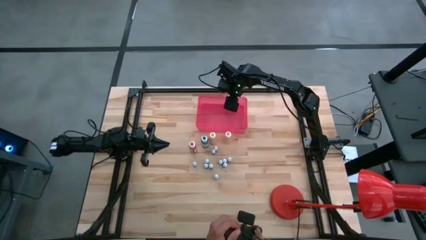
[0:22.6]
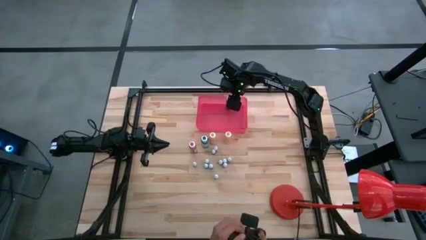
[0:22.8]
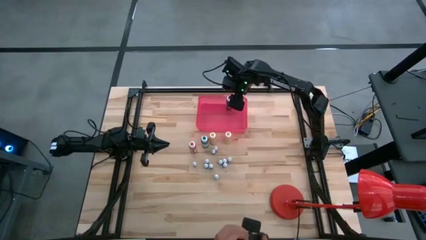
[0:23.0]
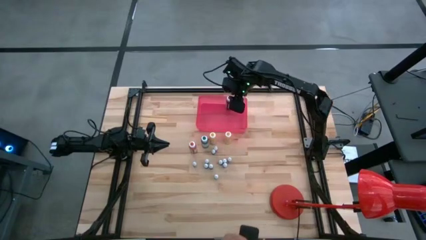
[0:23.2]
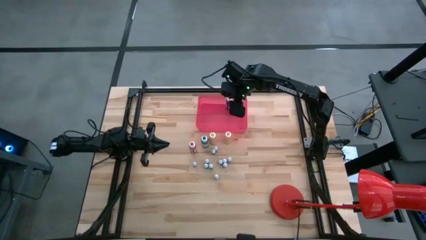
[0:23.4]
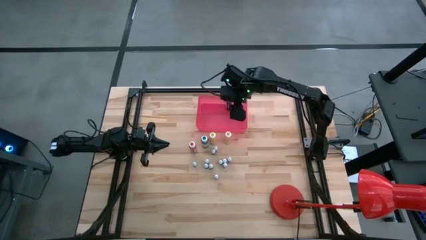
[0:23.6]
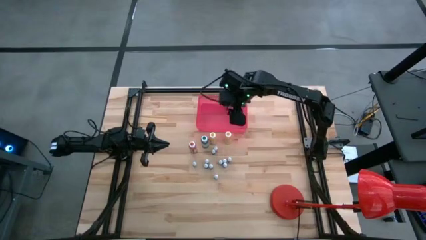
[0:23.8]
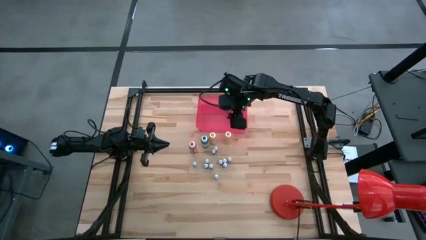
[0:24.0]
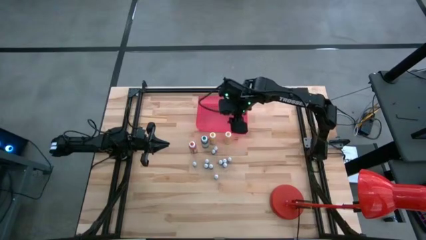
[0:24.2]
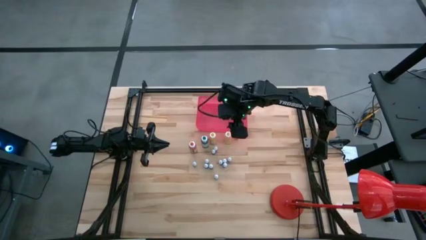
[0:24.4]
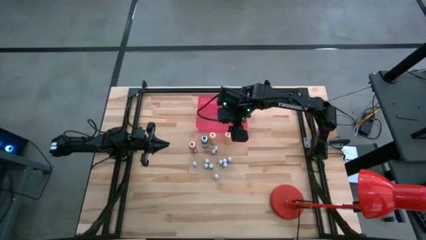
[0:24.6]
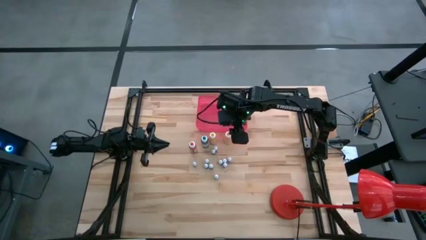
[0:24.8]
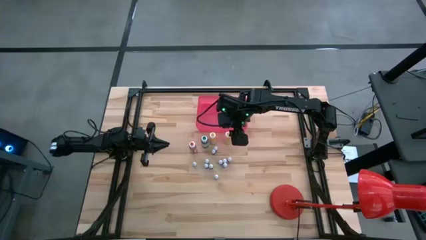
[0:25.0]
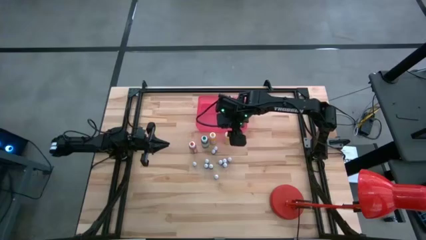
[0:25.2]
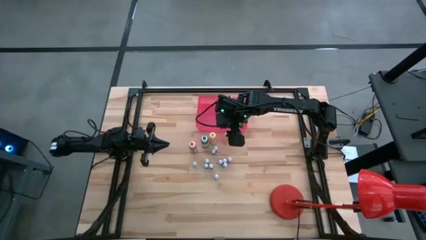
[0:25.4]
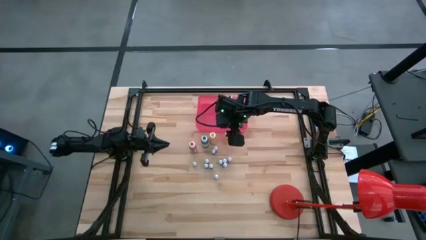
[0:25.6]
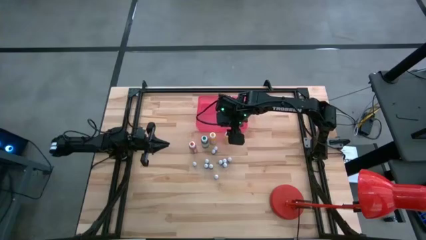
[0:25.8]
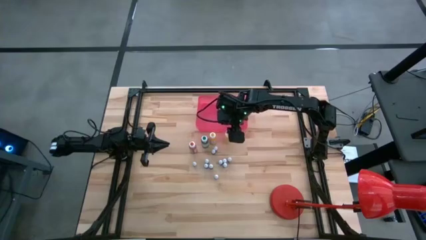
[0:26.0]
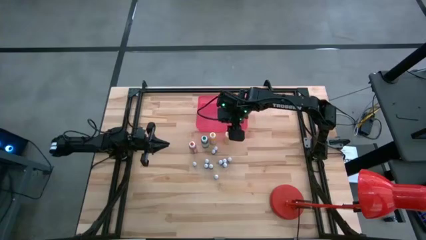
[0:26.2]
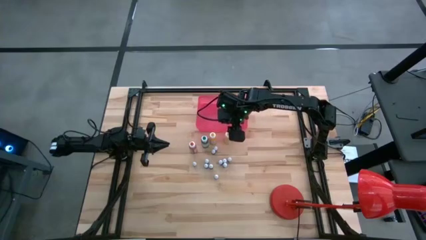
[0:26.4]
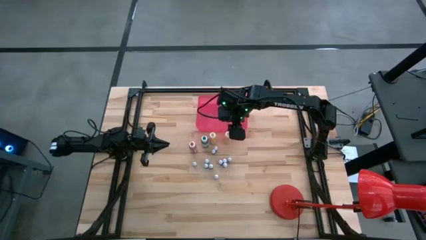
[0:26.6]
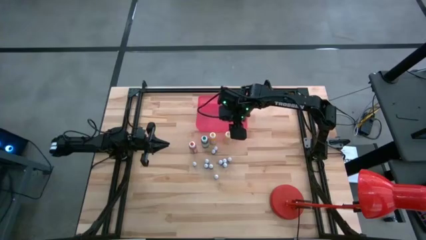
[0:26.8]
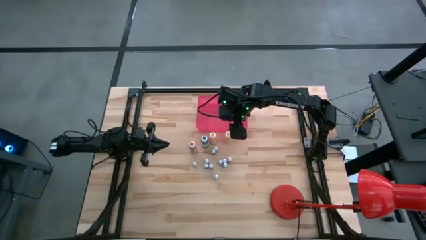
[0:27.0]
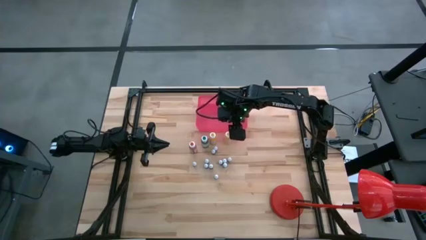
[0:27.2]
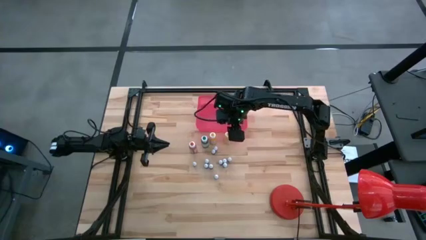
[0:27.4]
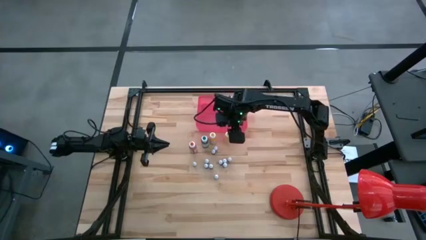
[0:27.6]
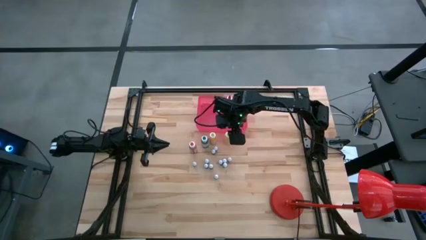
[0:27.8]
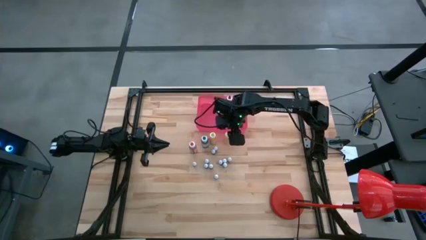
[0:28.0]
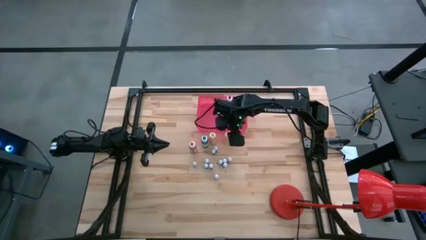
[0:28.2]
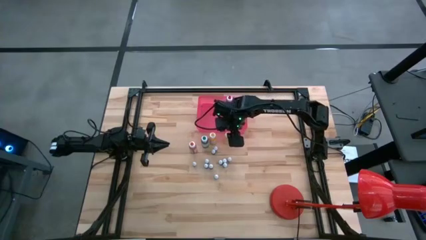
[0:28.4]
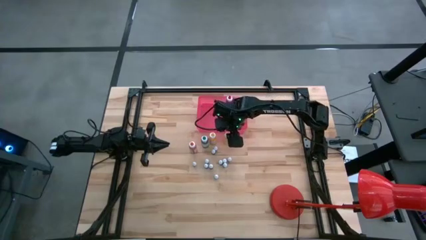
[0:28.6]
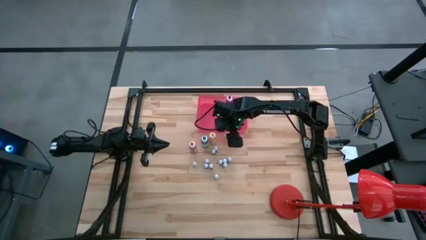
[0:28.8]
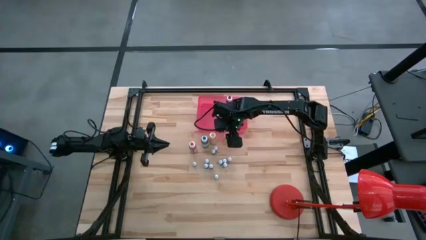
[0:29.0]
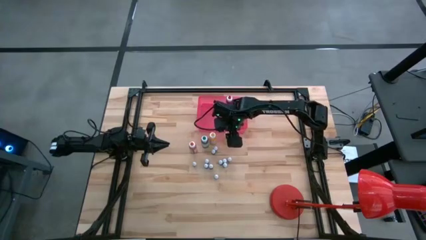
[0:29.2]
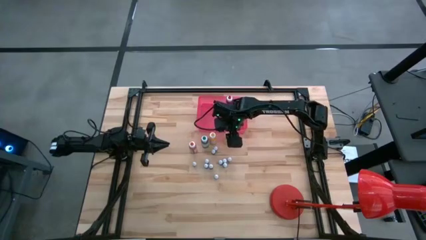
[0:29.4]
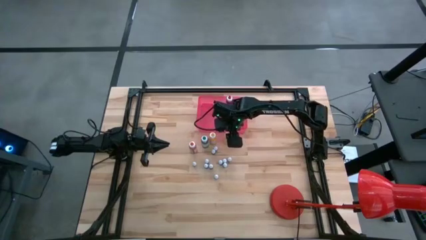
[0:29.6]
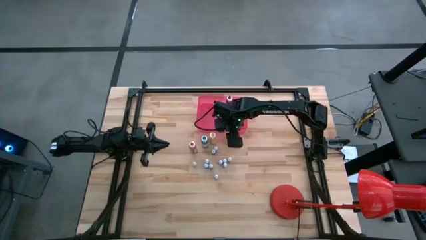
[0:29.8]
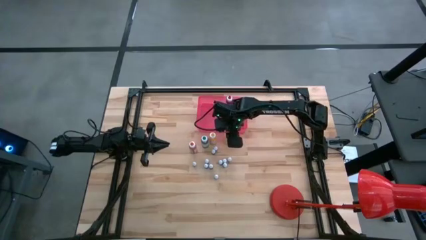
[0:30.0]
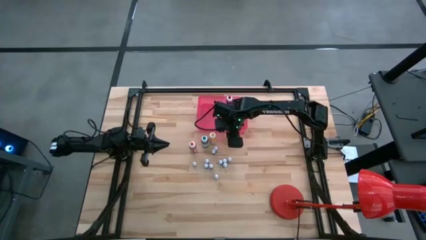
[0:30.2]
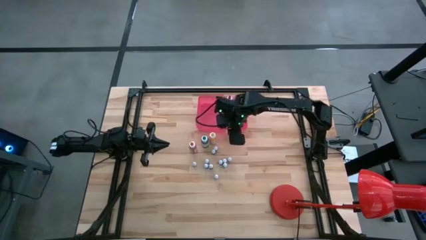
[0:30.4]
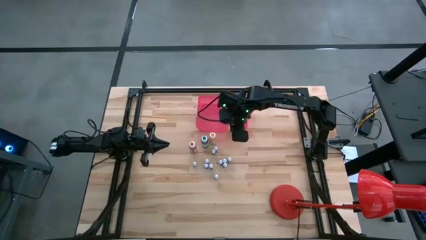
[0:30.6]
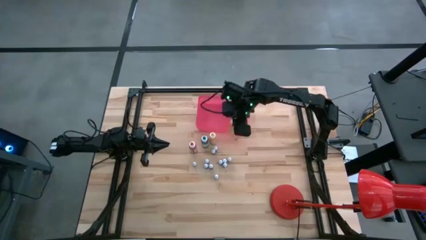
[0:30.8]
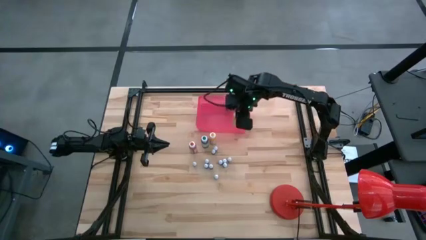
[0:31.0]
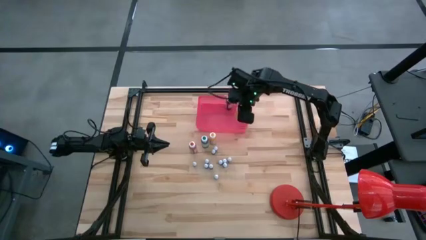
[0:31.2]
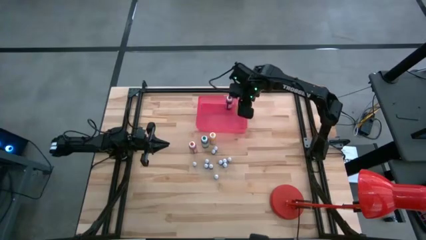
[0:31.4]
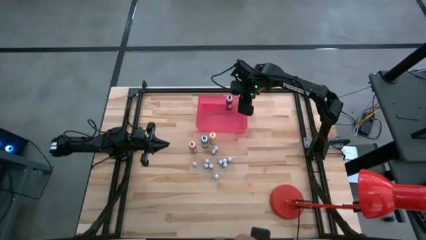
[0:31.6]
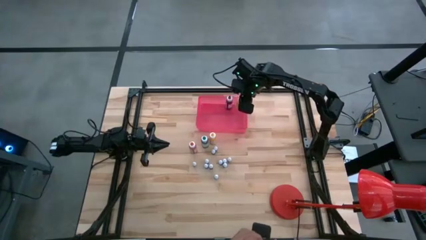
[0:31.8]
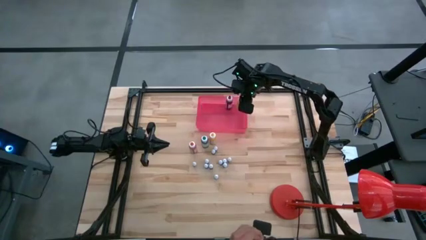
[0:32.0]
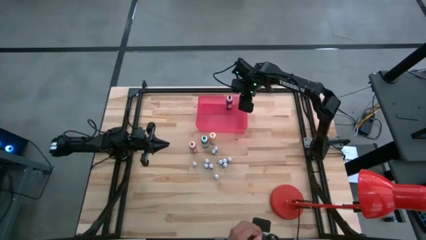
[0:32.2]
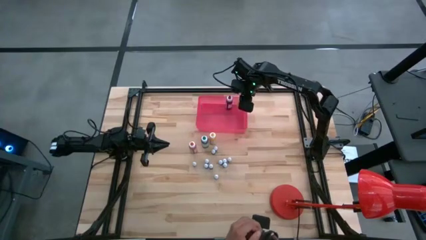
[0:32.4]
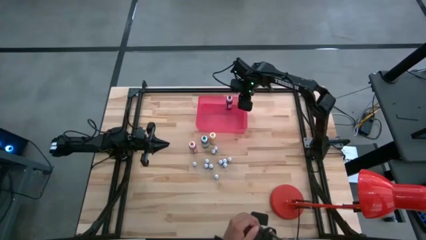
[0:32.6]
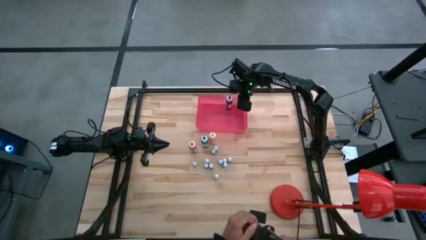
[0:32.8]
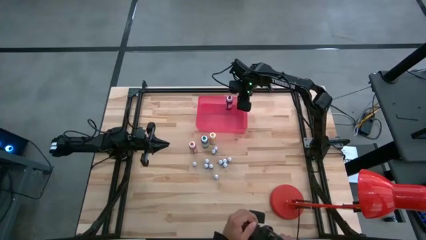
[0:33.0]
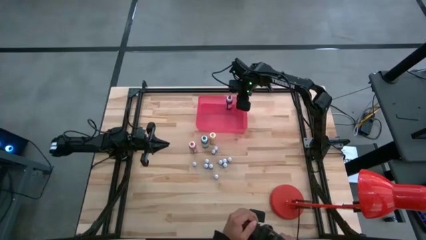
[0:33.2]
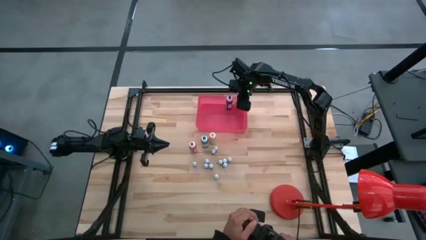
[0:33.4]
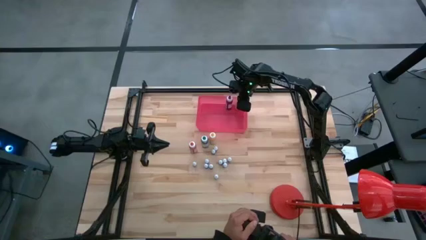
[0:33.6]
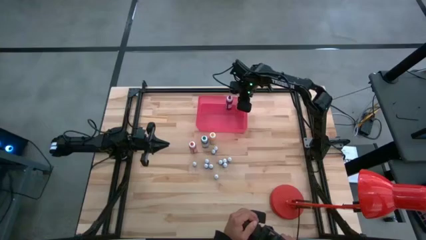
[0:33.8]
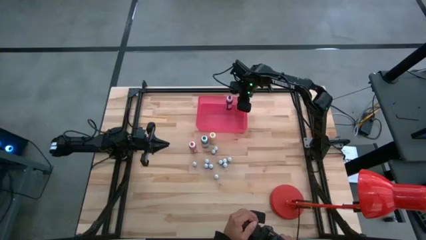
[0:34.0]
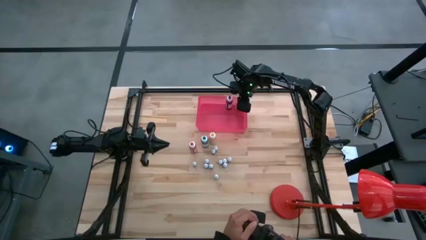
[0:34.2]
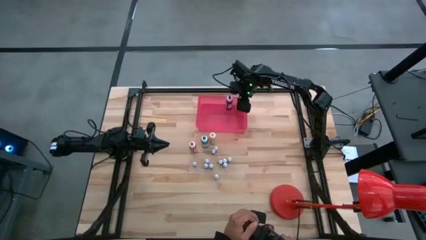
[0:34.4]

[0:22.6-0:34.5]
Task: Pick & Place food coloring
Put the large yellow food coloring bottle into the pink bin

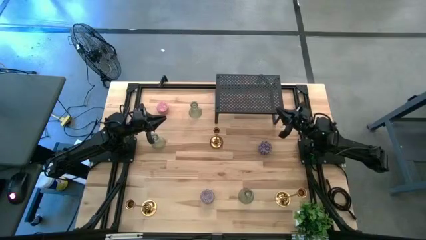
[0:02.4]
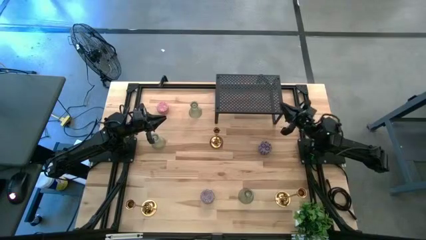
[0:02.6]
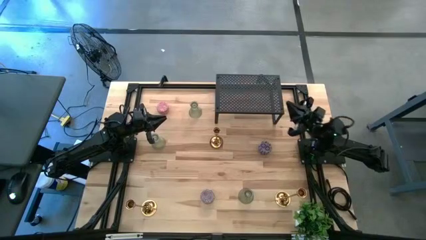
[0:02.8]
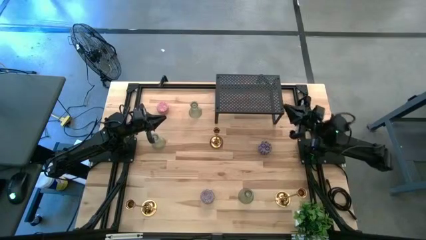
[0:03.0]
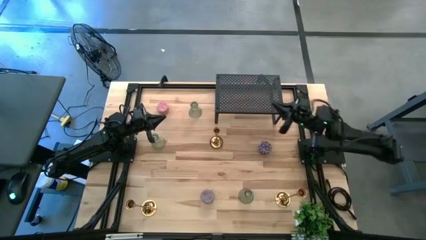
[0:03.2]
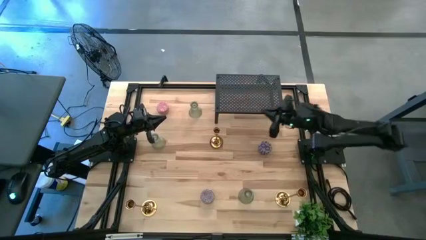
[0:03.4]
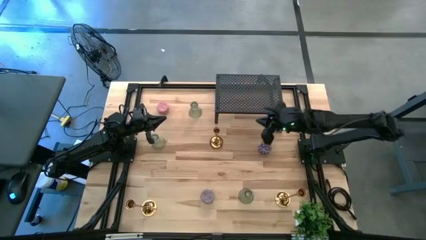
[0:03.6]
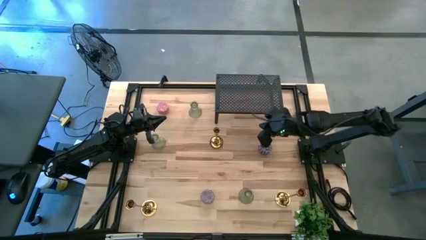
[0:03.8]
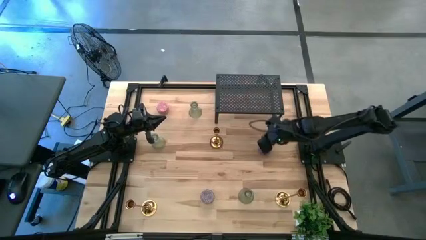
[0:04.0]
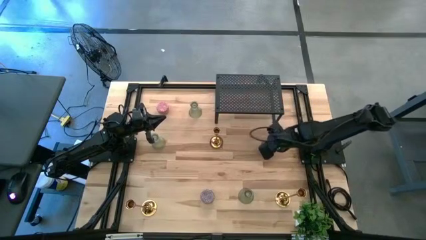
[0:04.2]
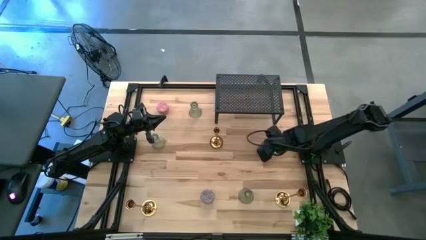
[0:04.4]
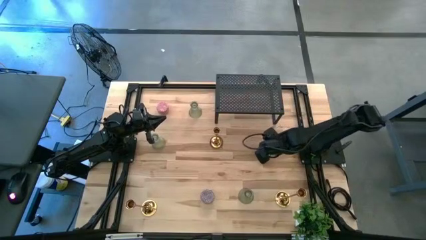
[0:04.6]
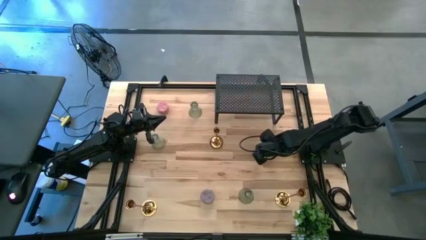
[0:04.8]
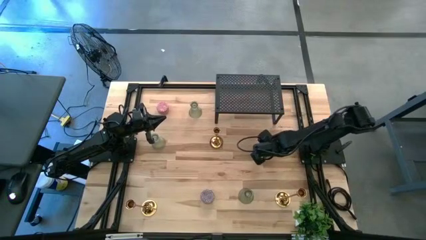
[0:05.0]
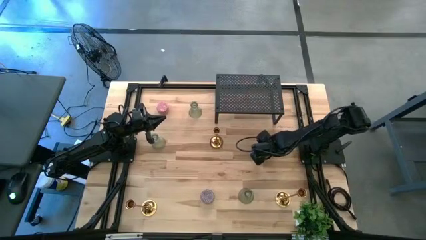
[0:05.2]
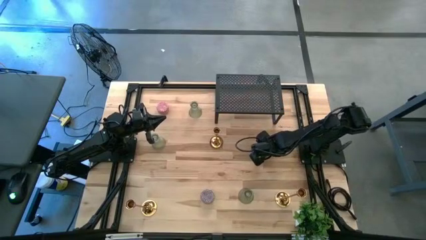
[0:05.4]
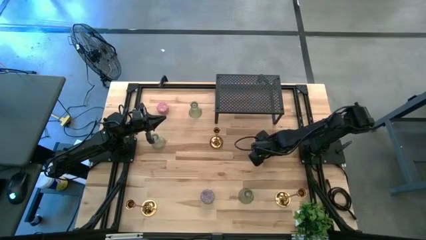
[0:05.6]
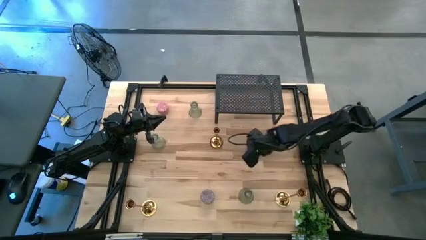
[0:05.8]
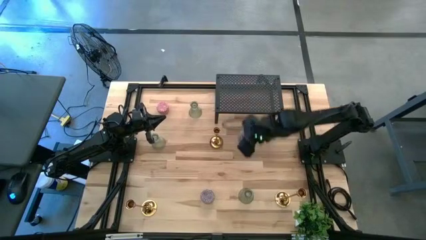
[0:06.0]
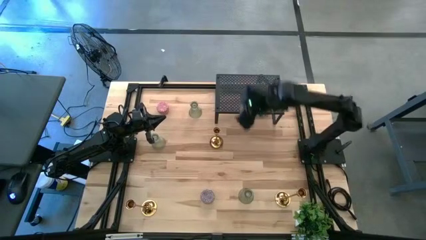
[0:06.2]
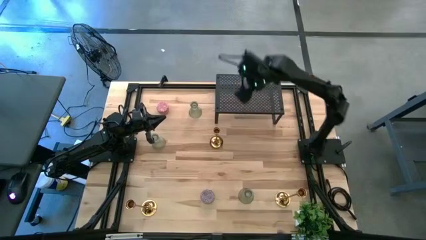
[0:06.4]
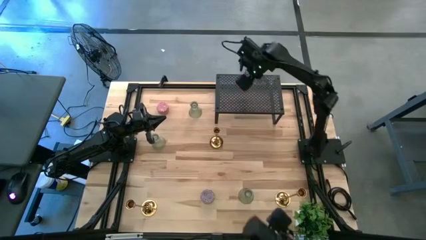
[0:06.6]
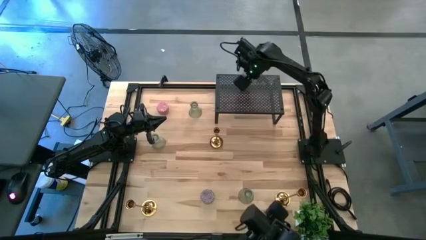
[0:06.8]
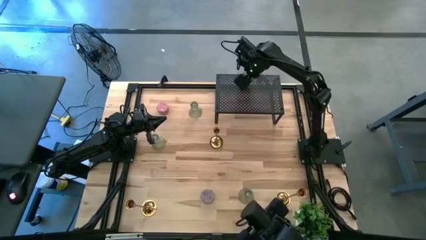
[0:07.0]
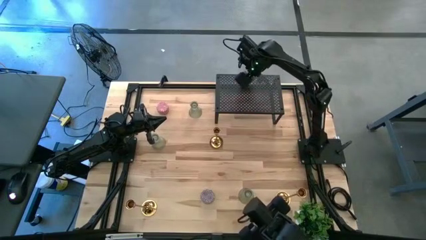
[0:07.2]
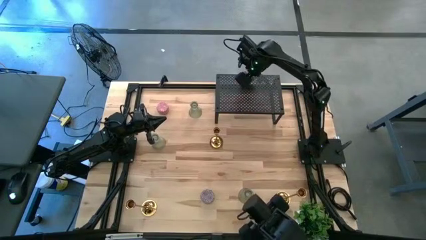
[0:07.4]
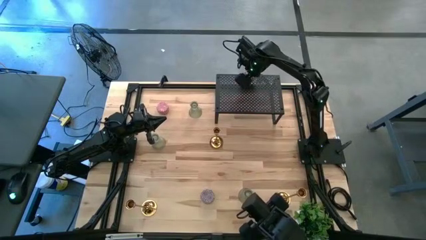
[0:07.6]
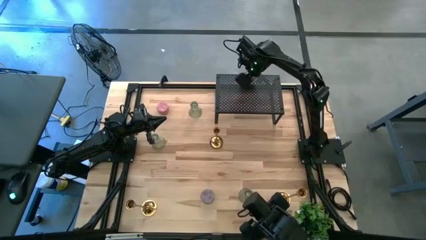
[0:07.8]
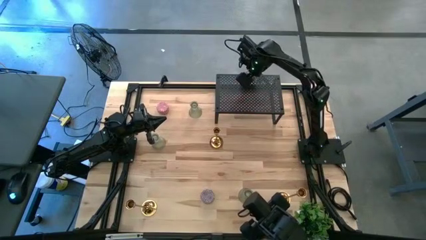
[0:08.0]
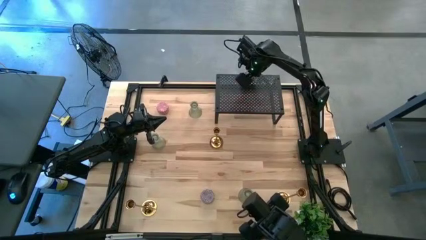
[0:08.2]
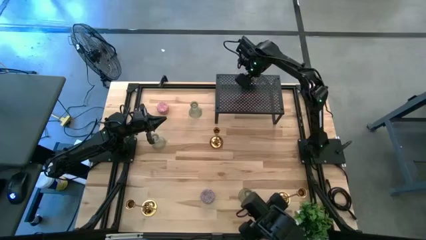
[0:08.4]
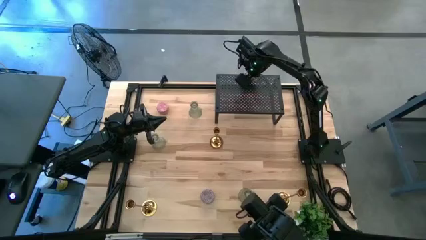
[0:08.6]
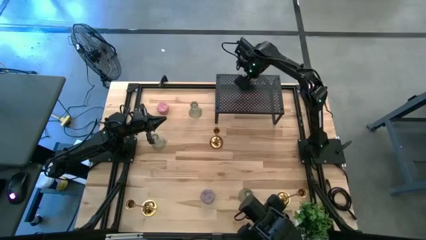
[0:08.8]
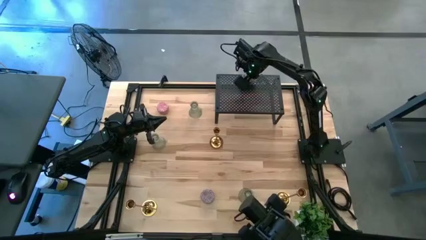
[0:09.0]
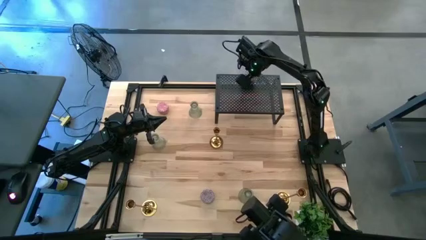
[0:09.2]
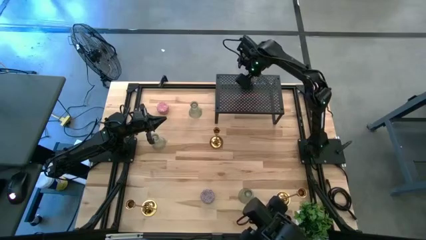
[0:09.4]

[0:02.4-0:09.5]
Task: Pick & Place candle stick holders
Put the black patterned candle on the shelf
